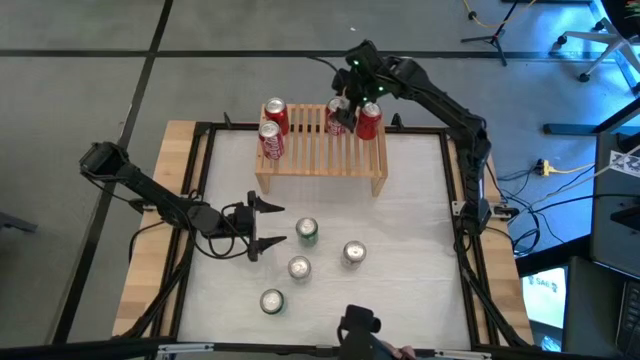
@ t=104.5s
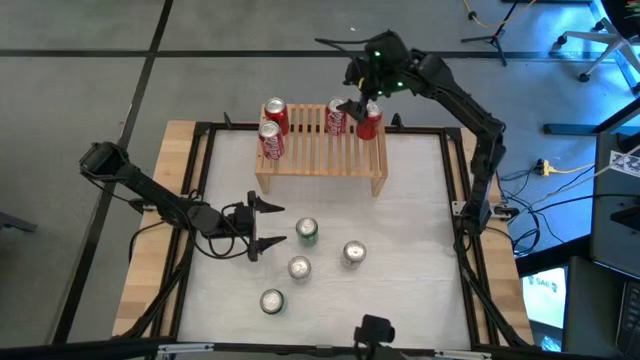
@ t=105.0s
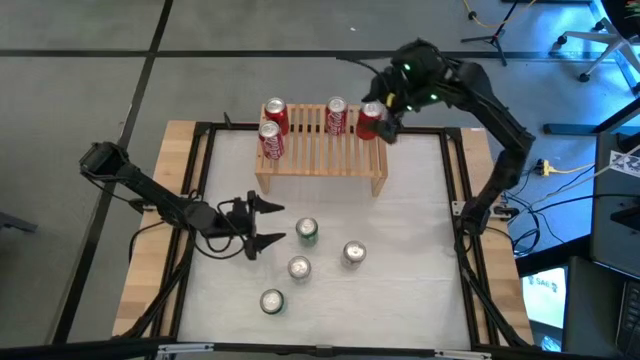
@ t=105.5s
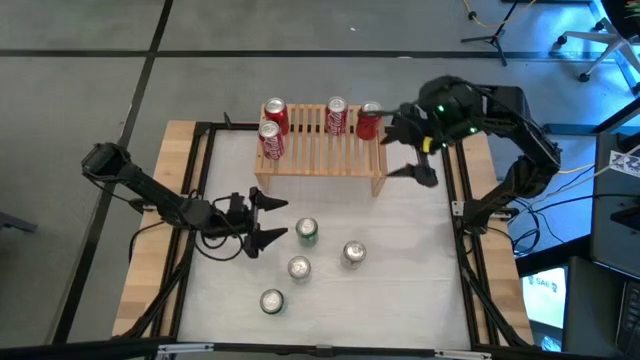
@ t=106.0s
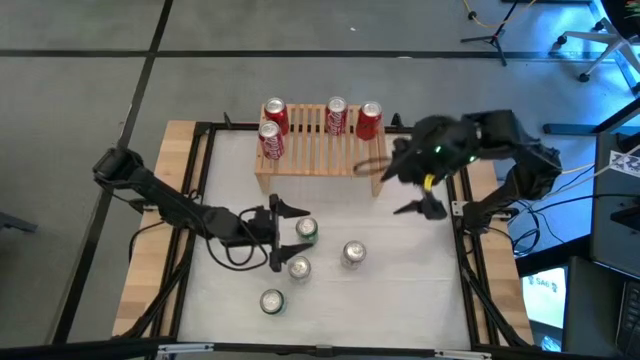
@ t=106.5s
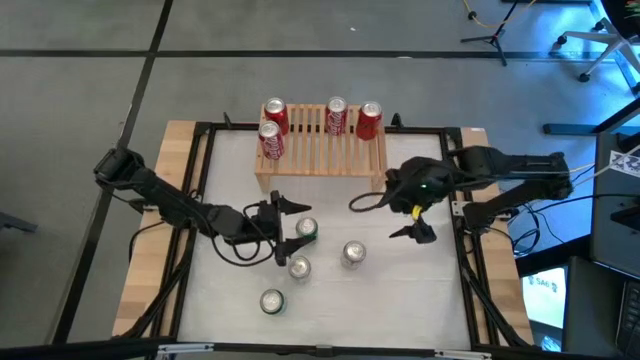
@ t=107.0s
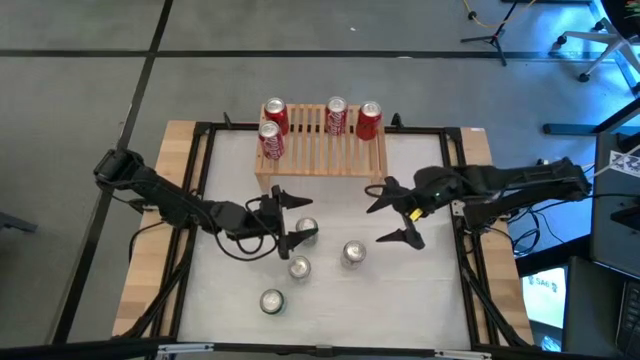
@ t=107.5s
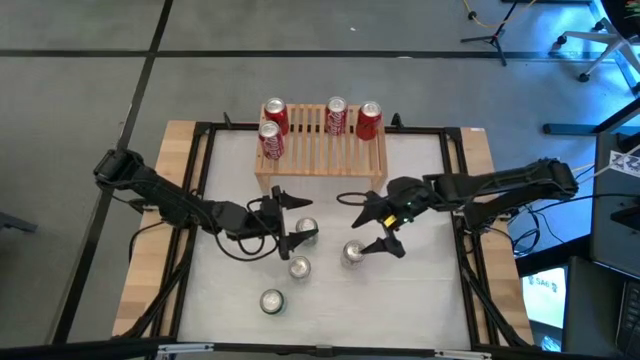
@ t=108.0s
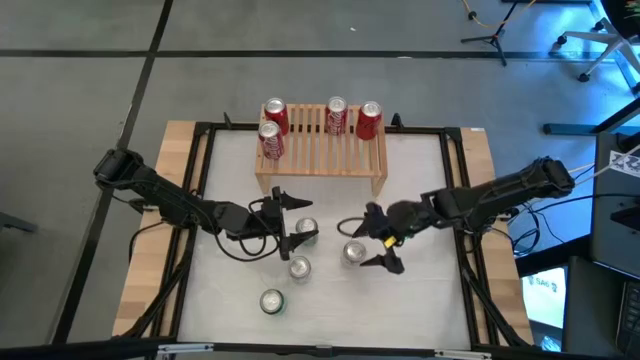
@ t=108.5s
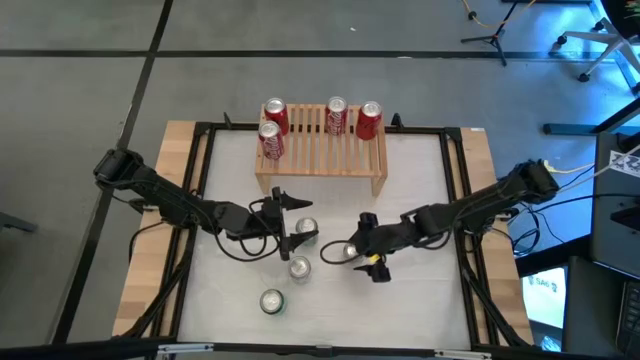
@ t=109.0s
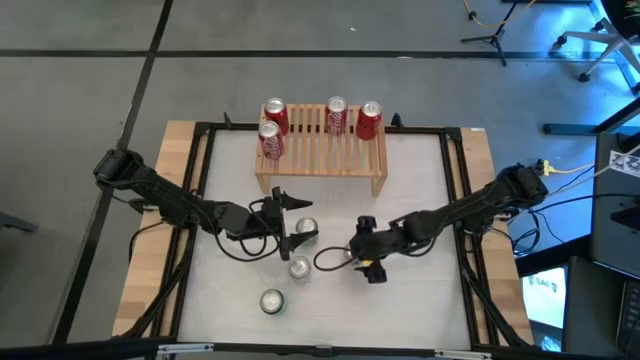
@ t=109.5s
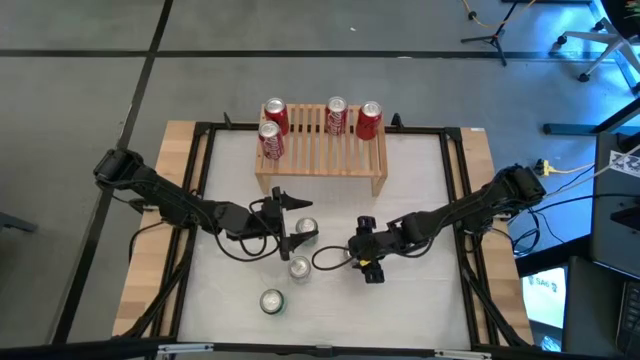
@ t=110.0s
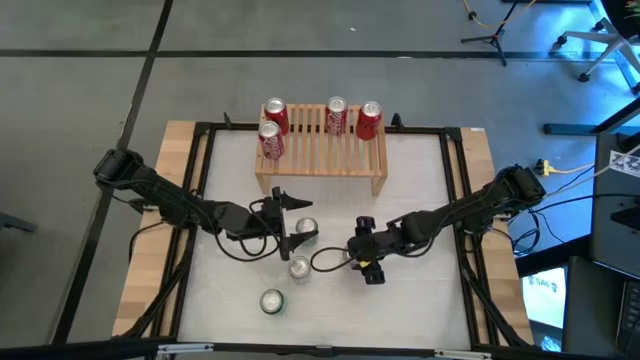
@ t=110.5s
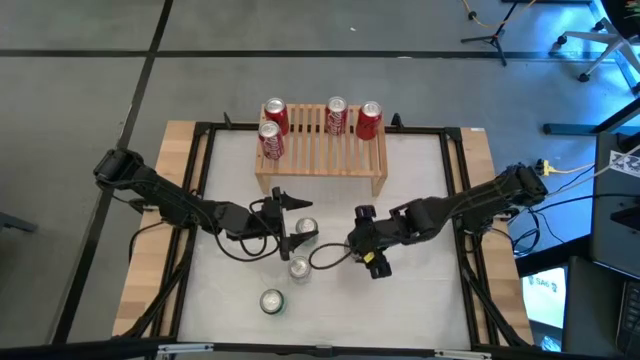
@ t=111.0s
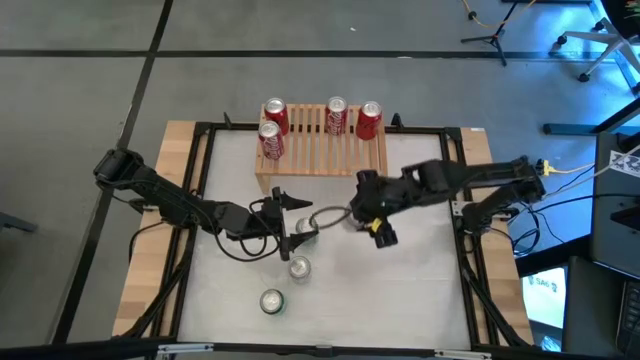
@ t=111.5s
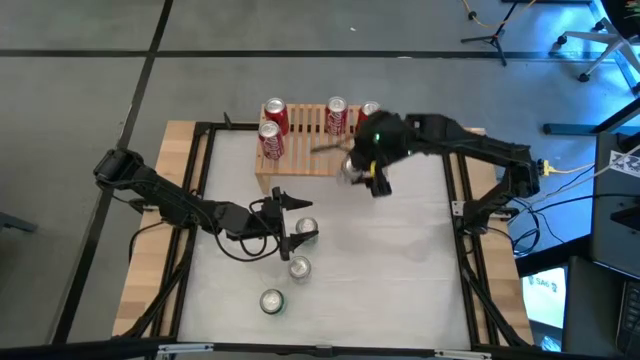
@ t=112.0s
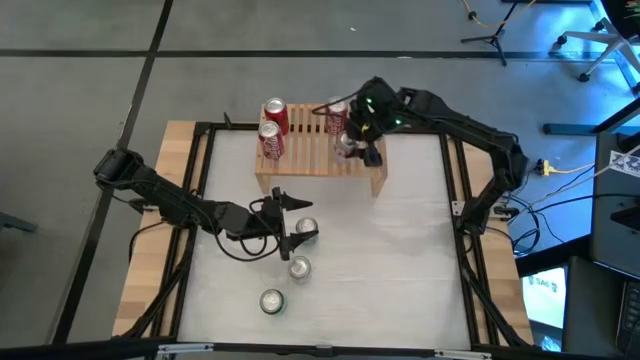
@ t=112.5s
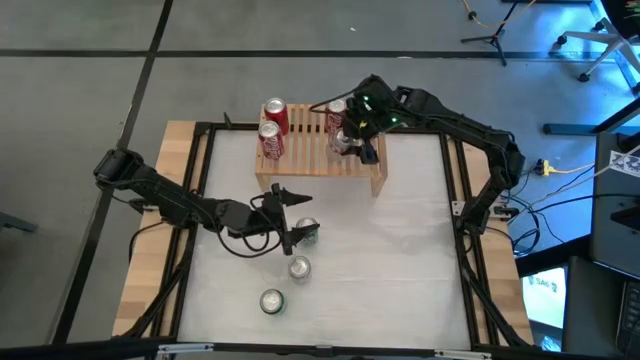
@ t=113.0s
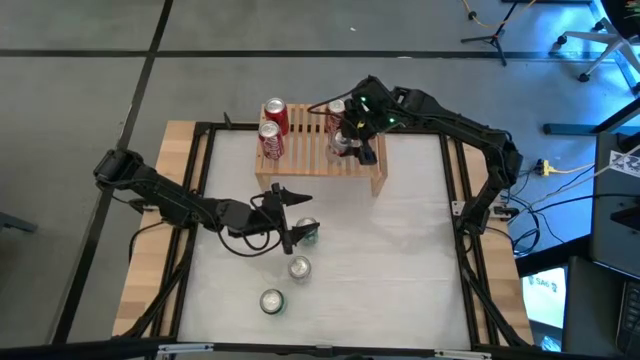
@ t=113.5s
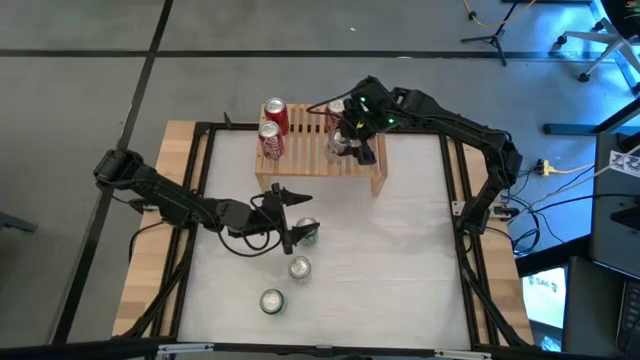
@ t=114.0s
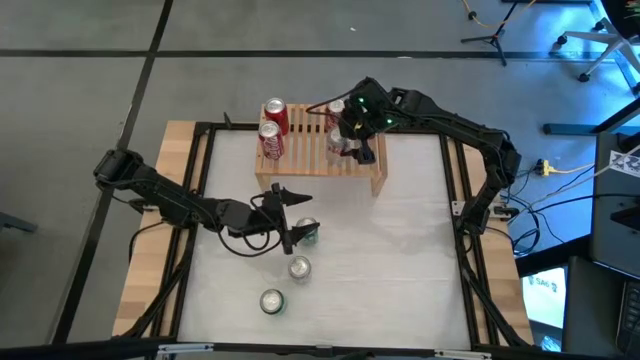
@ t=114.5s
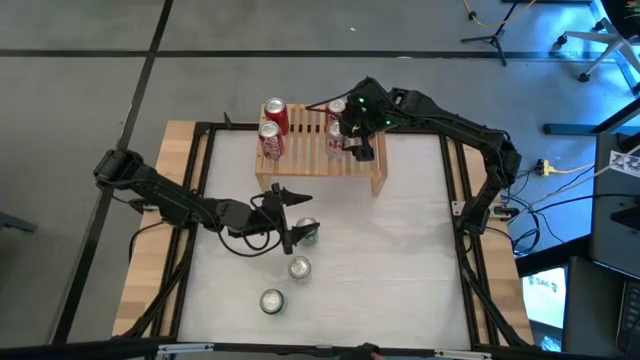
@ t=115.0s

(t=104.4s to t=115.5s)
Task: Place canned beverage on shelf
Put the right red silver soda can on the shelf

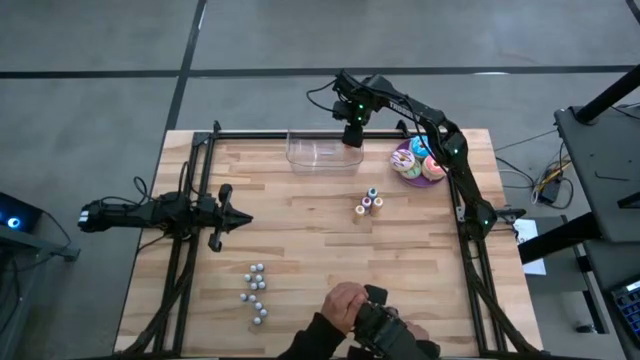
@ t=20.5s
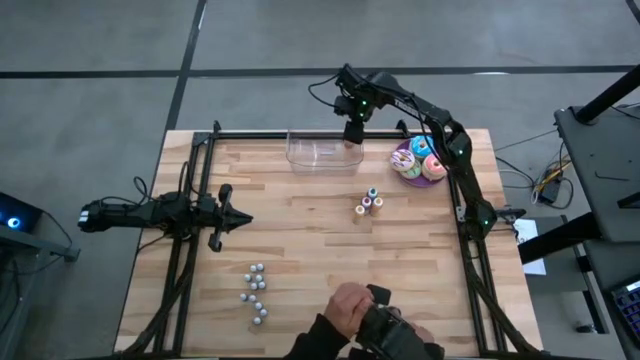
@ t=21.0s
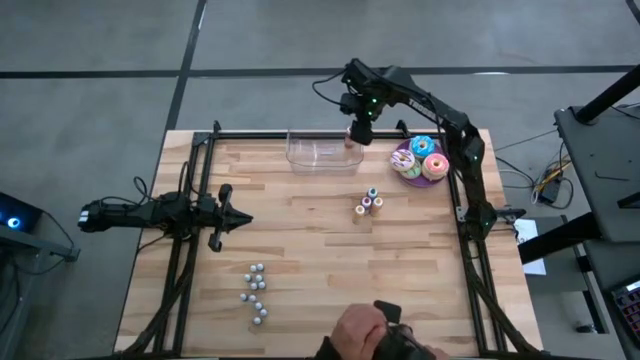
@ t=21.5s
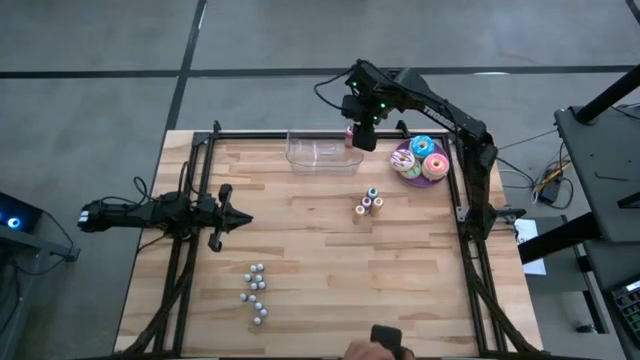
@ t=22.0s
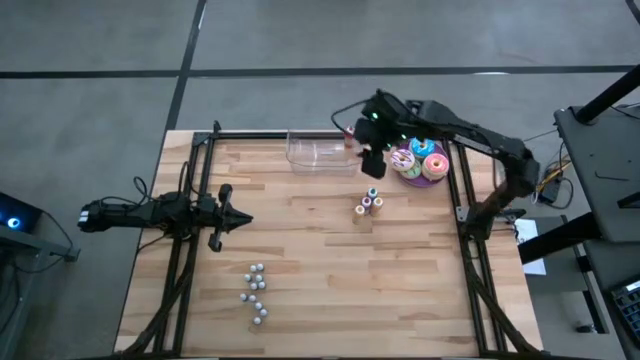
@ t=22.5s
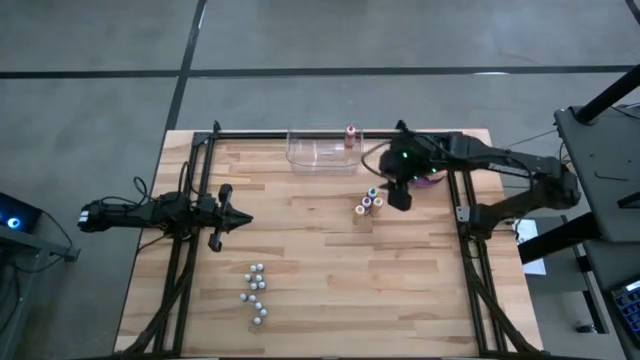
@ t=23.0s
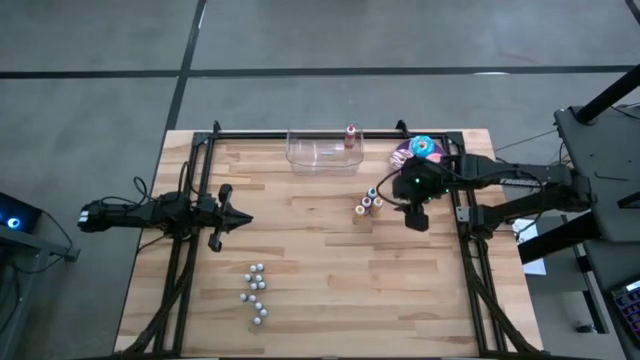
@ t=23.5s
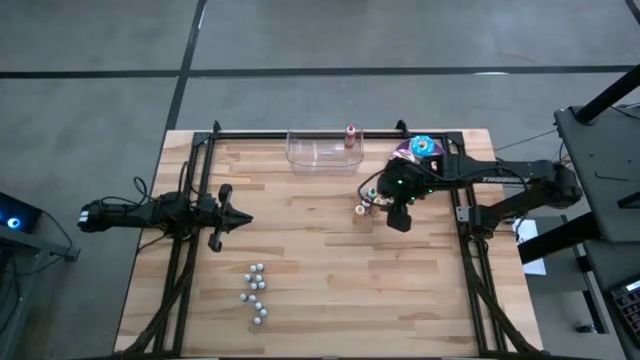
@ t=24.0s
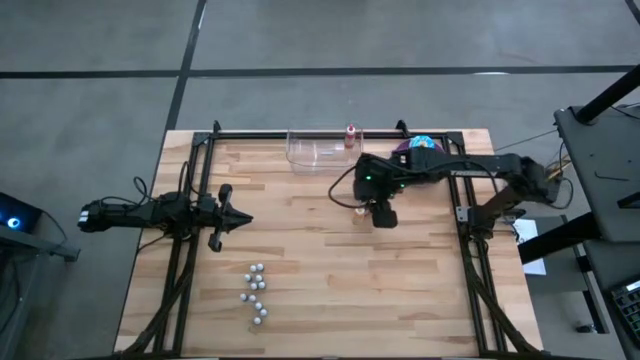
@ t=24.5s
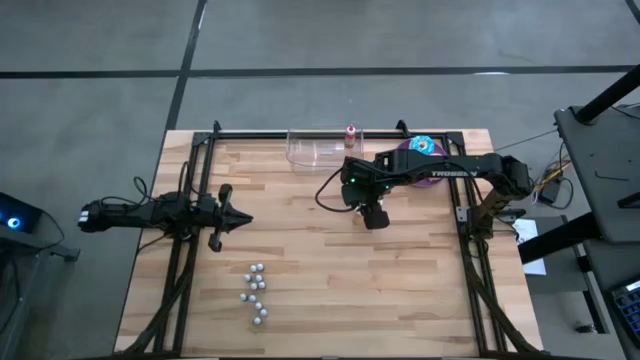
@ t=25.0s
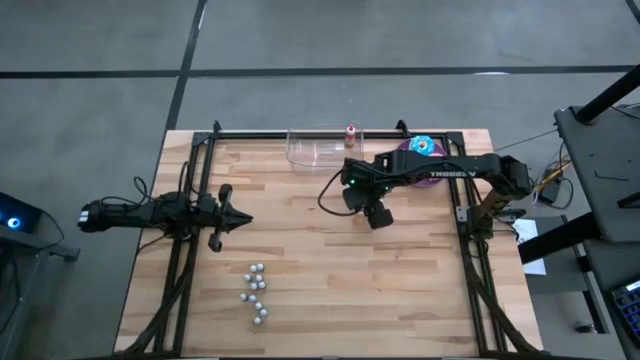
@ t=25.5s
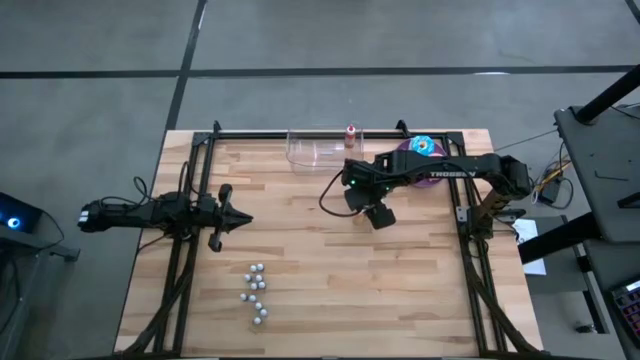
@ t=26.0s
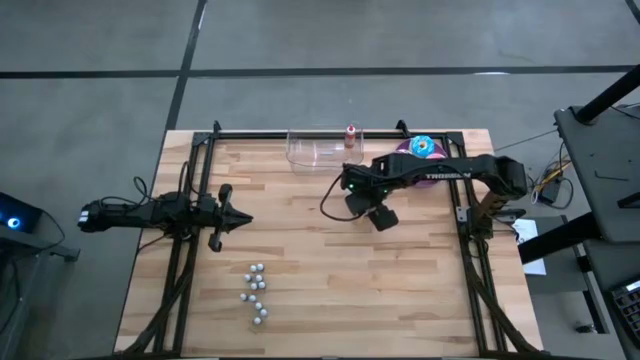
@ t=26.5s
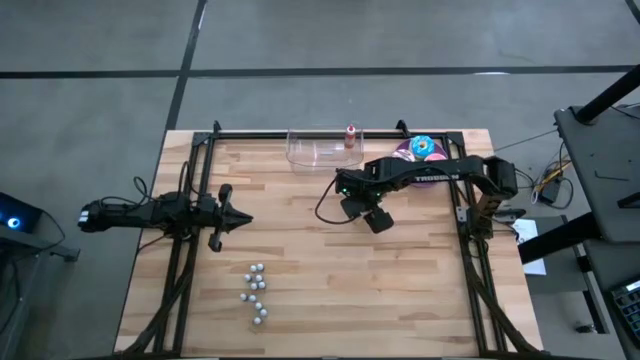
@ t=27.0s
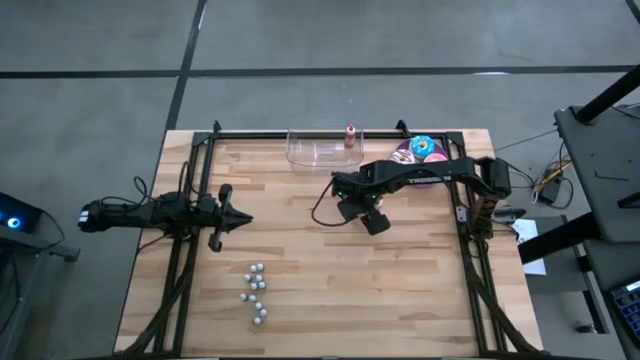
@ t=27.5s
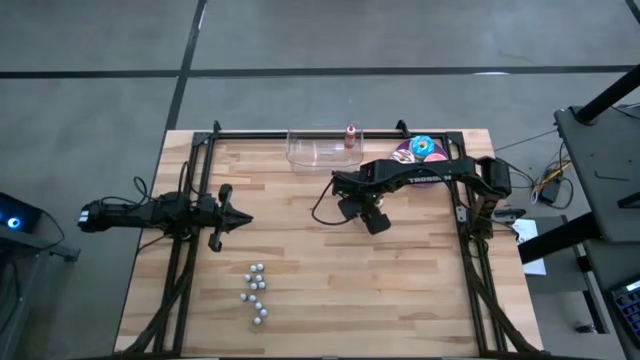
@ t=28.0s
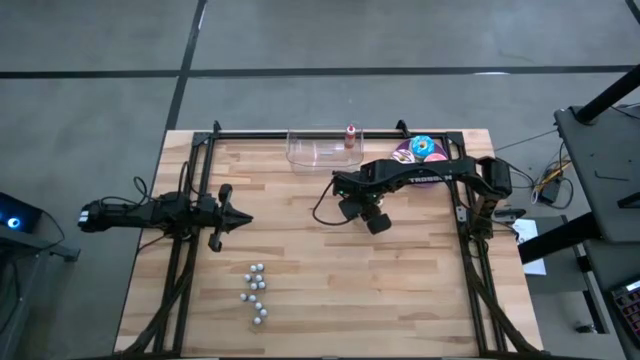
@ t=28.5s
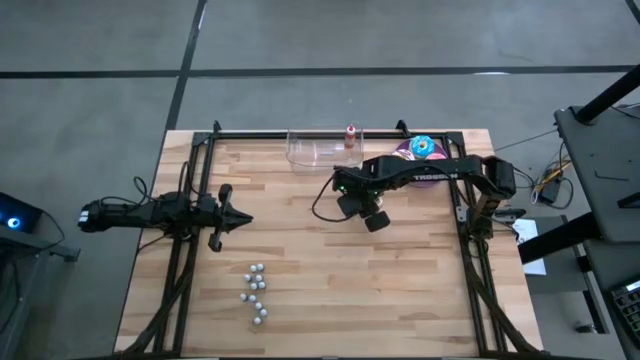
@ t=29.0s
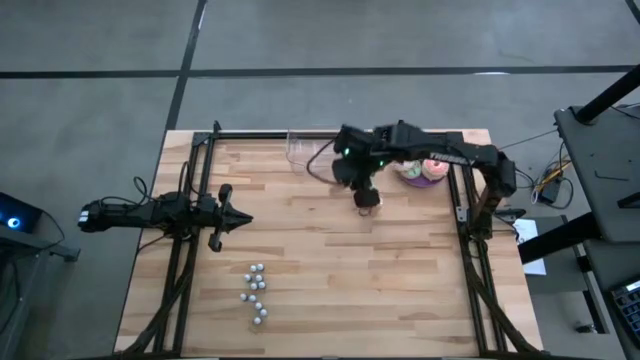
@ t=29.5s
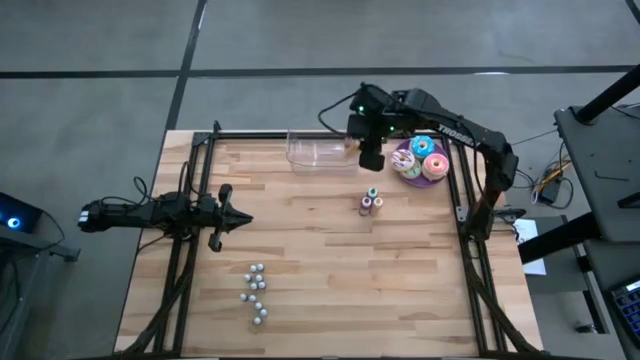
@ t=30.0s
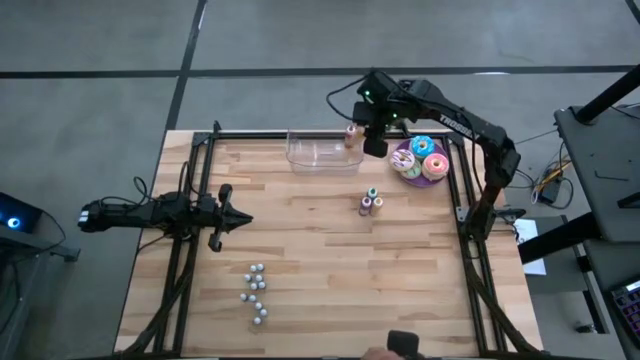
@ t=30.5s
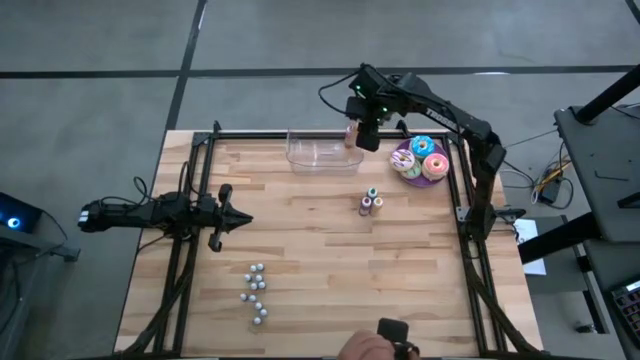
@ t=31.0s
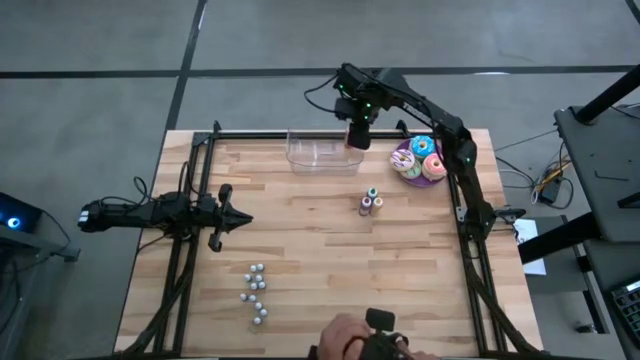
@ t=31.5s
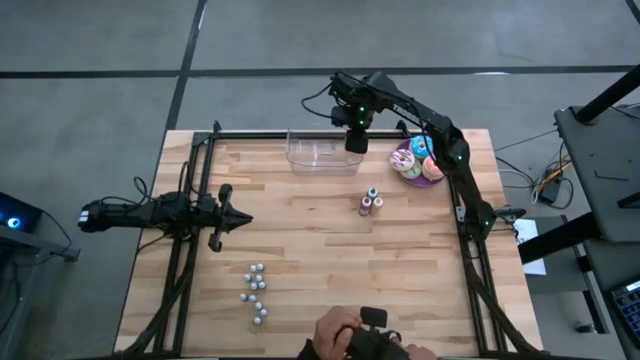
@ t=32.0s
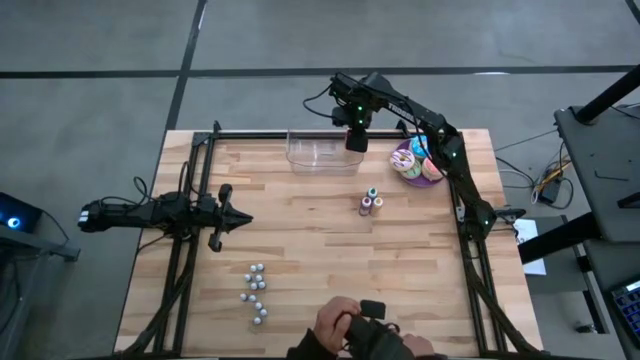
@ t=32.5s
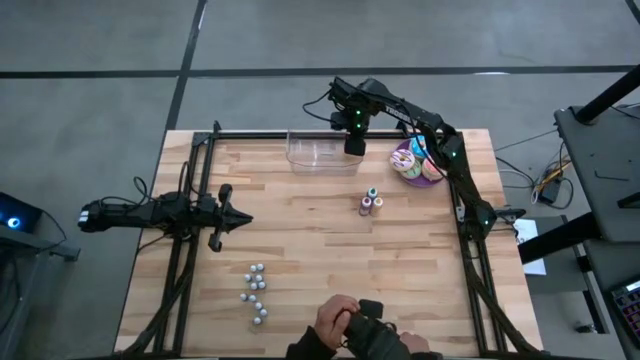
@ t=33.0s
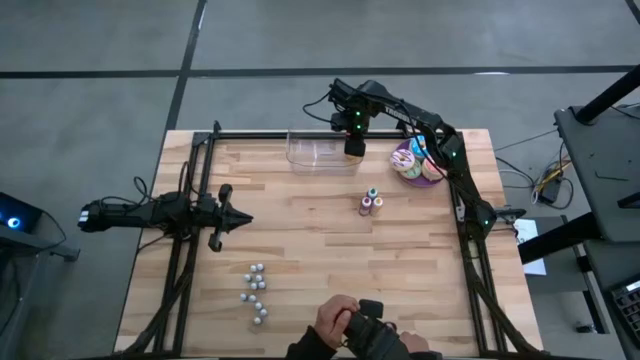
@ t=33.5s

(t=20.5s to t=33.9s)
Task: Pick & Place food coloring
Put the left large yellow food coloring bottle into the transparent bin
